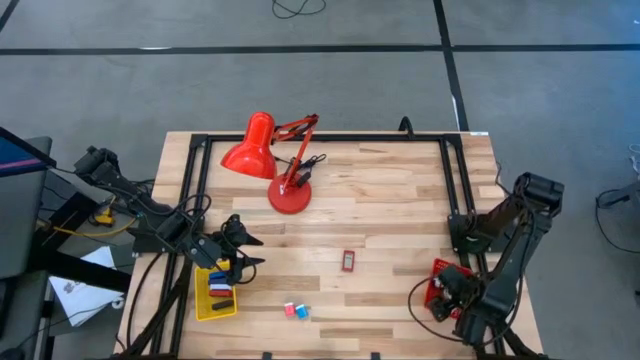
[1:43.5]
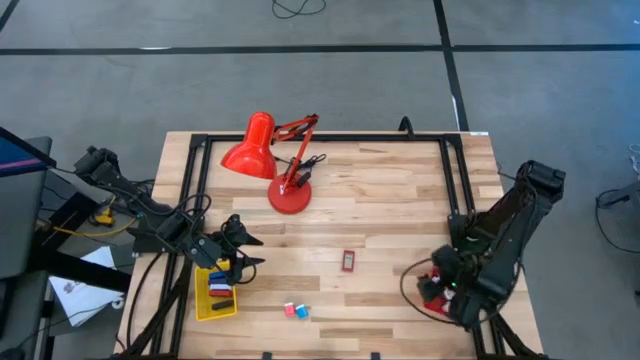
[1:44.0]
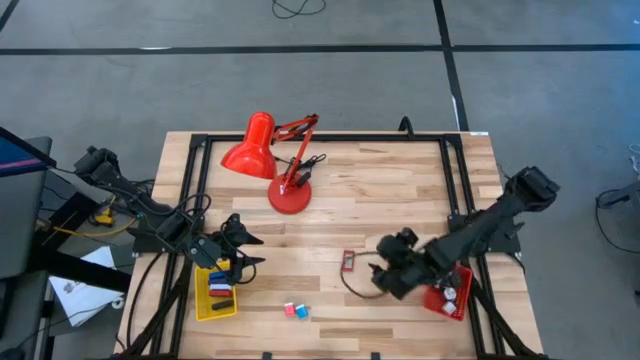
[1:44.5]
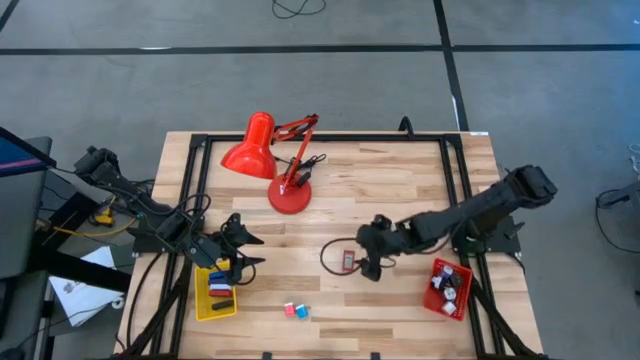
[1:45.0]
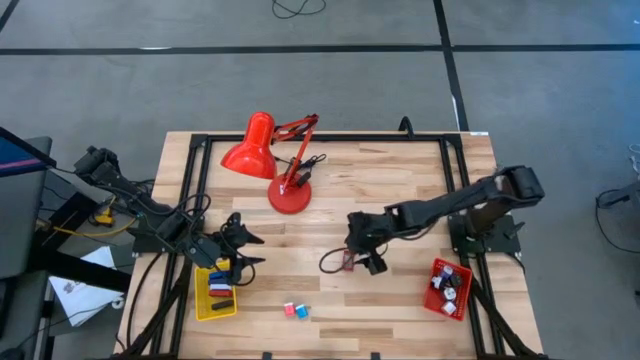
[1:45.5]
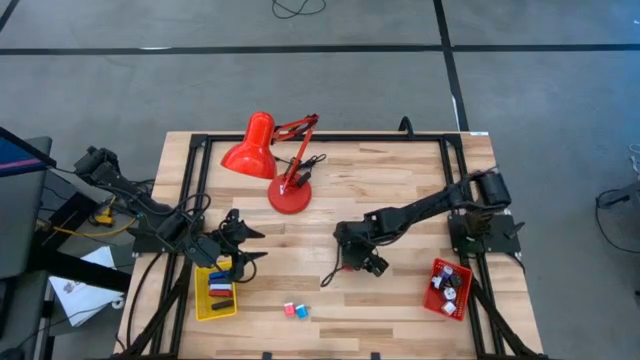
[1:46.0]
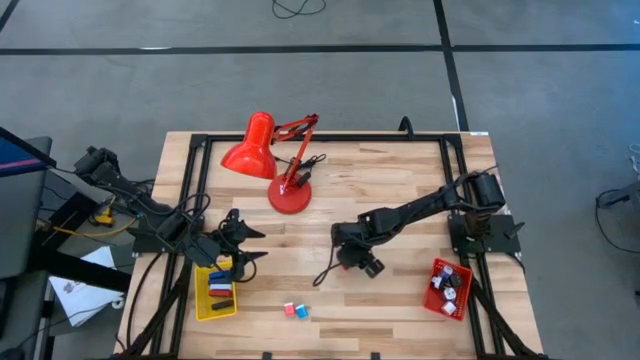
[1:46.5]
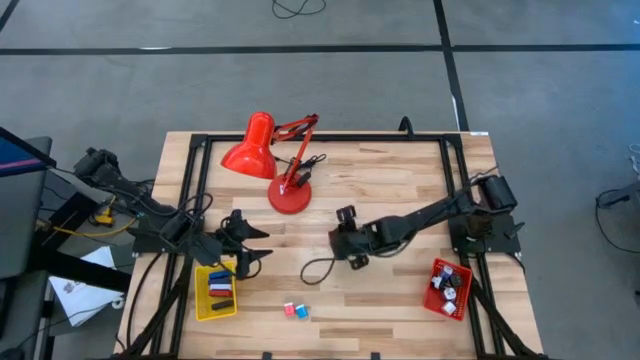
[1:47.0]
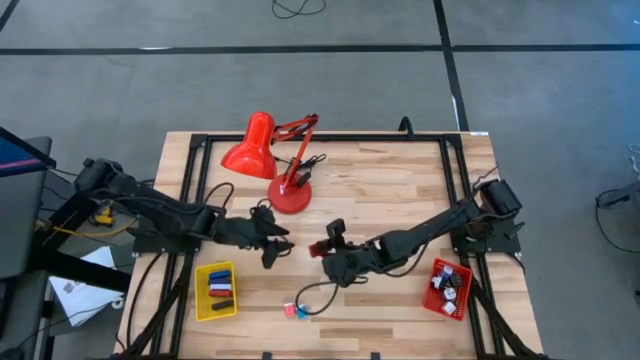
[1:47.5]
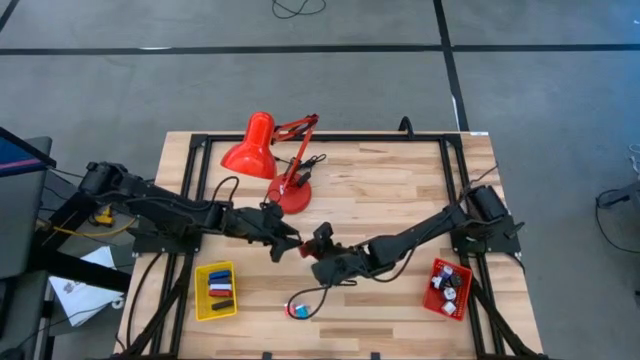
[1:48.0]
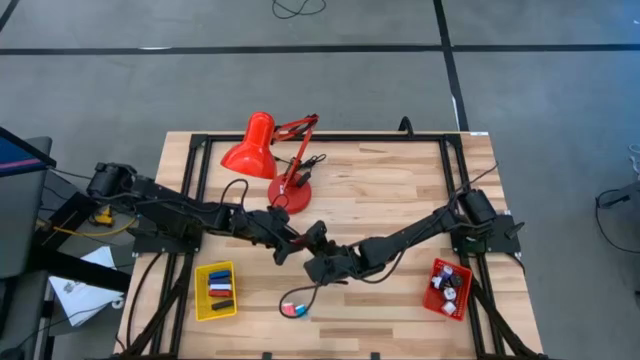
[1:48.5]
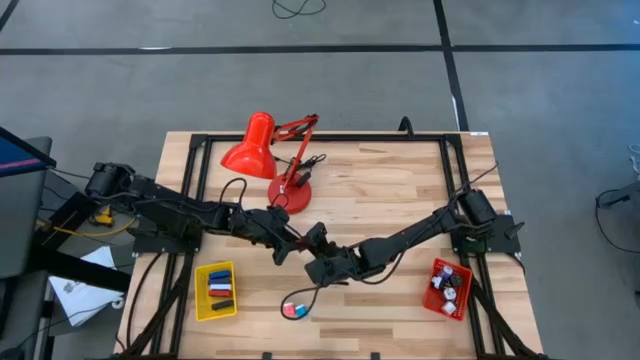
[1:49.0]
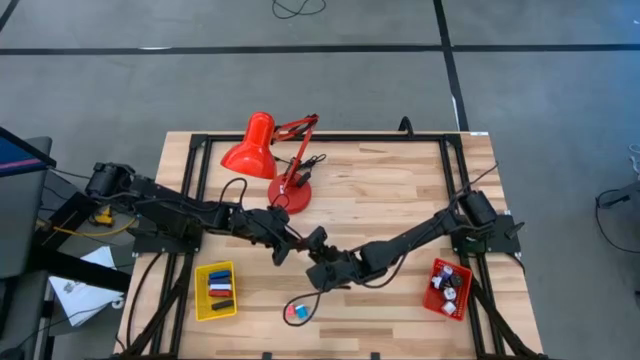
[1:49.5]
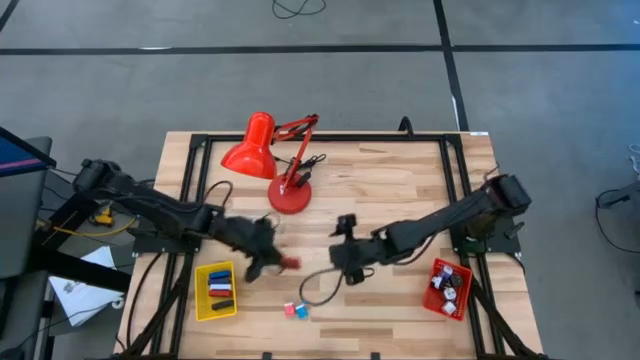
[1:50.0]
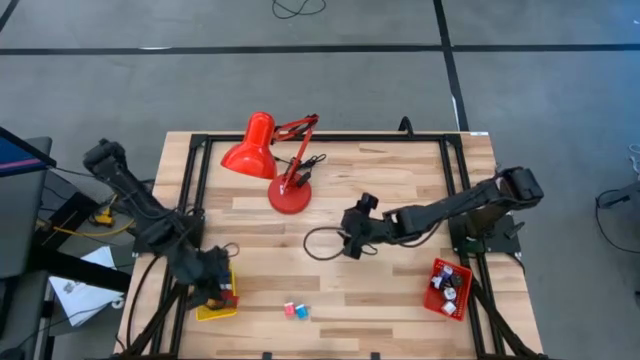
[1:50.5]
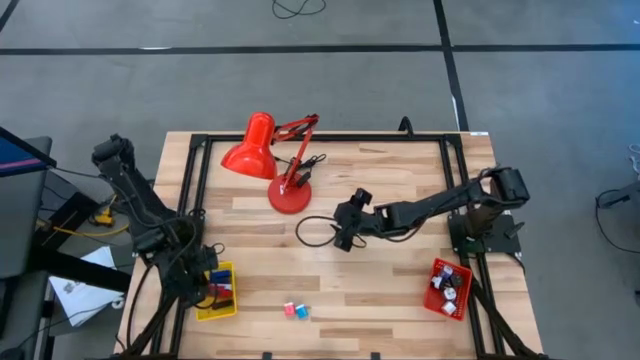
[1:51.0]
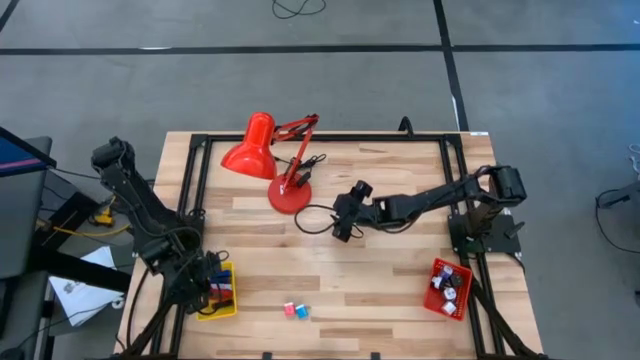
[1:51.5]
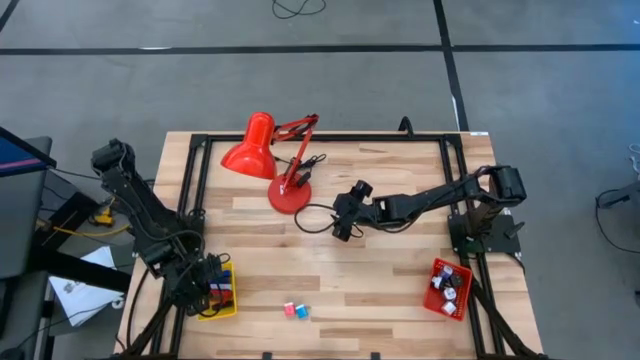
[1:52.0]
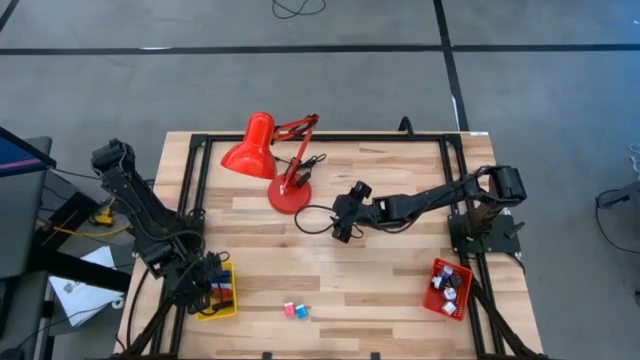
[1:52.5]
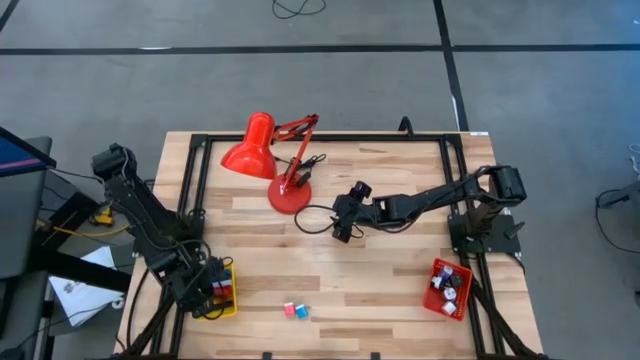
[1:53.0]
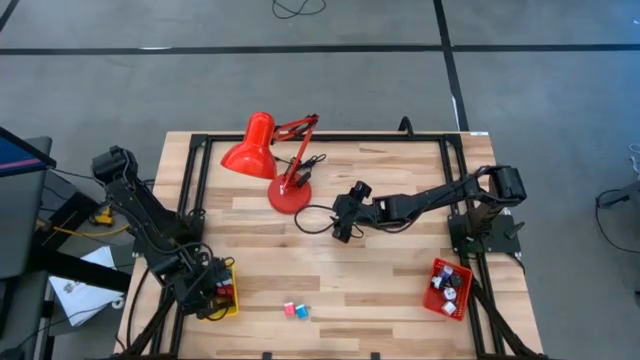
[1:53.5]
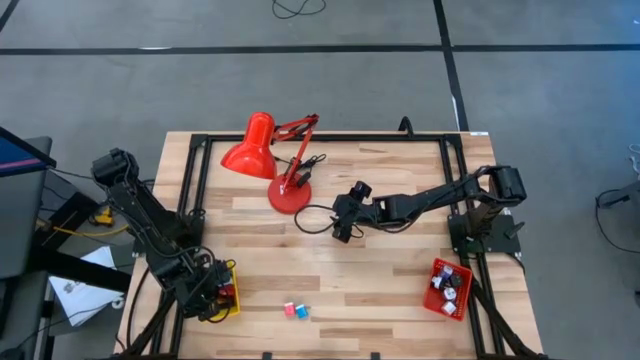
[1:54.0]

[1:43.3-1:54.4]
Task: Pick & Place Office items
Put the red digital timer into the yellow bin

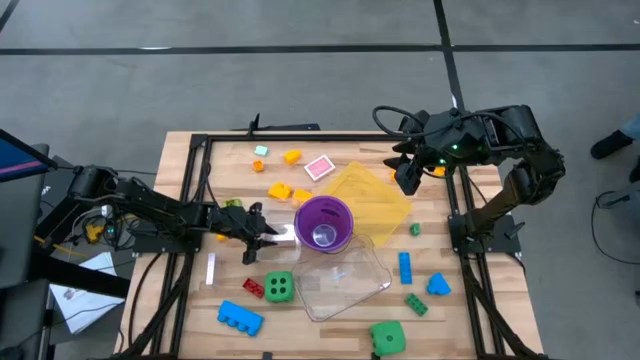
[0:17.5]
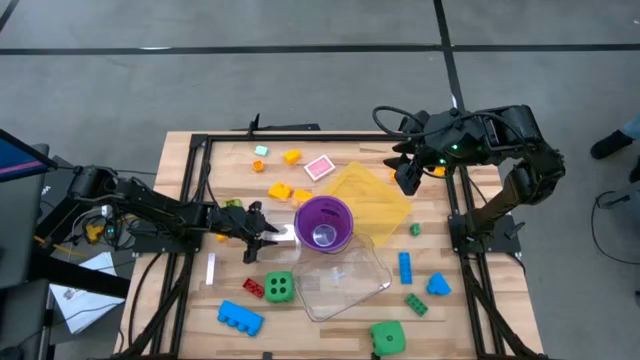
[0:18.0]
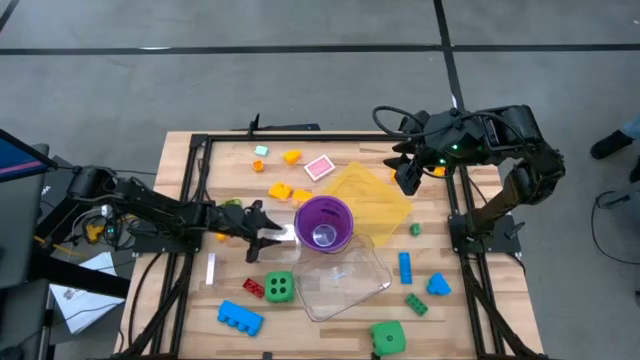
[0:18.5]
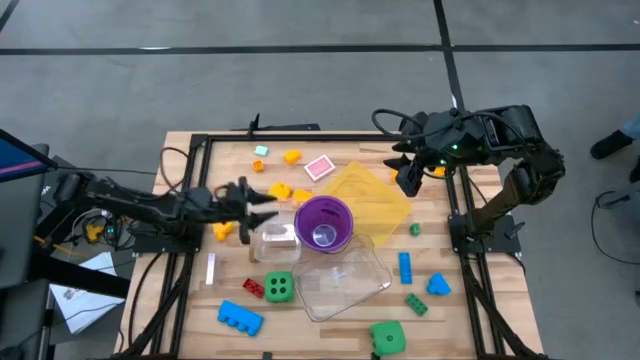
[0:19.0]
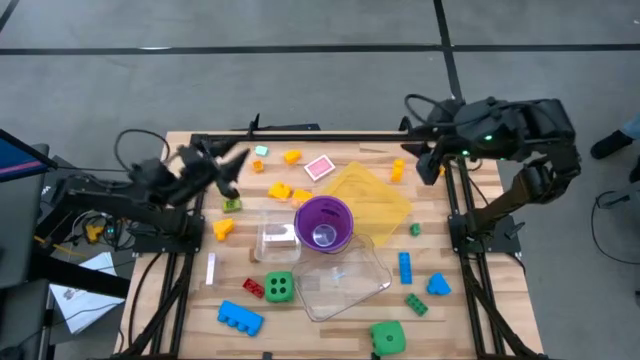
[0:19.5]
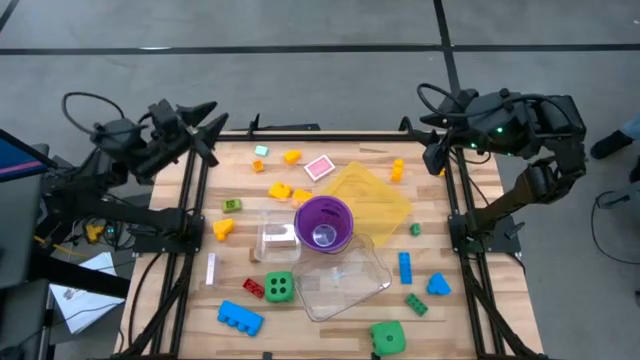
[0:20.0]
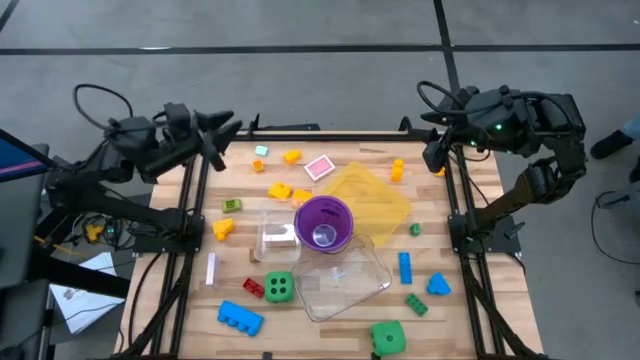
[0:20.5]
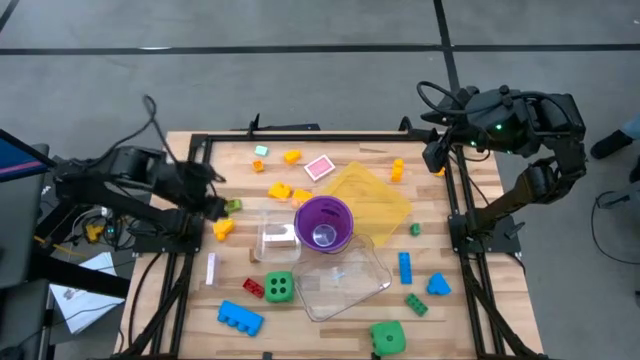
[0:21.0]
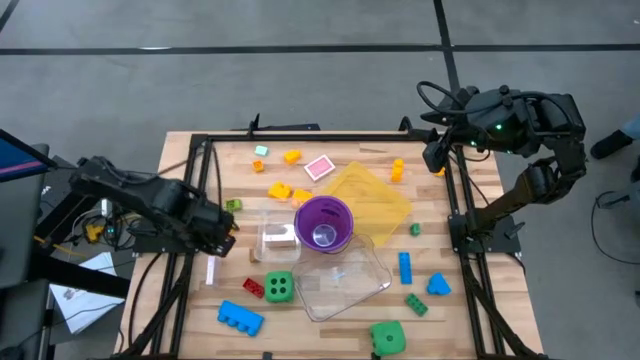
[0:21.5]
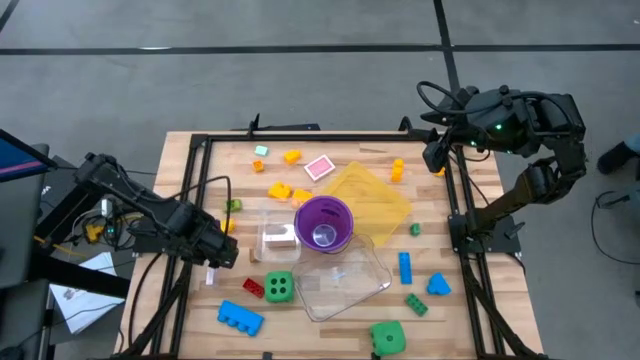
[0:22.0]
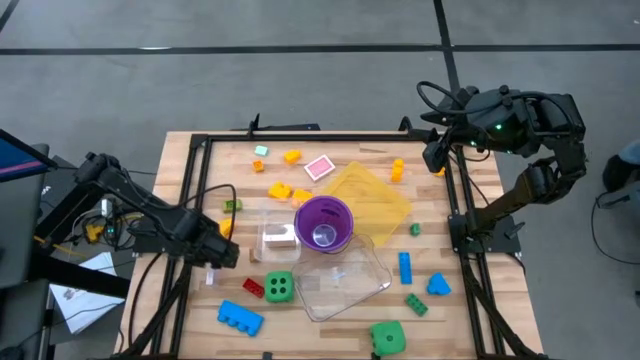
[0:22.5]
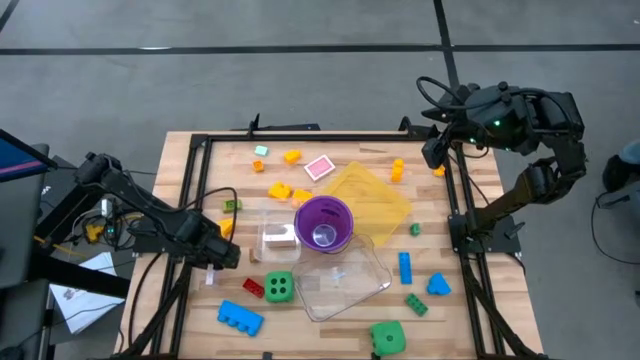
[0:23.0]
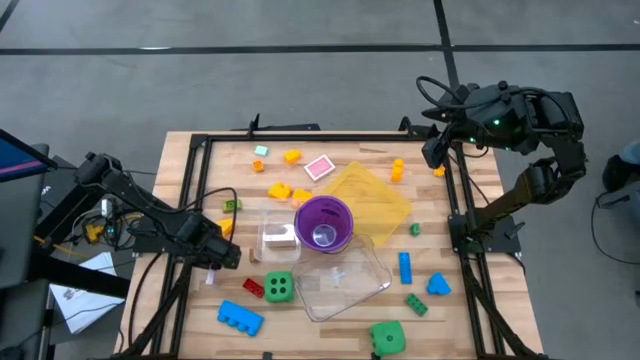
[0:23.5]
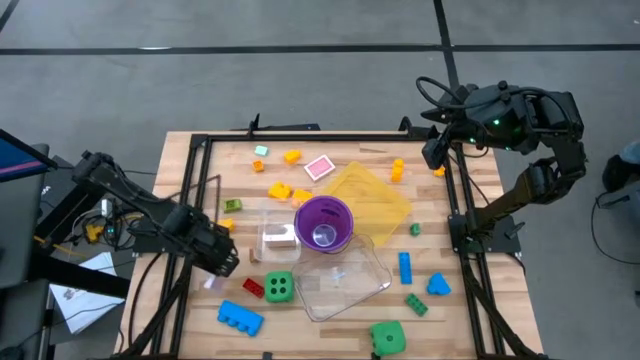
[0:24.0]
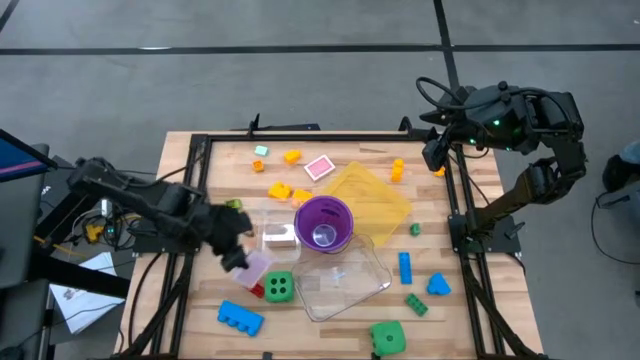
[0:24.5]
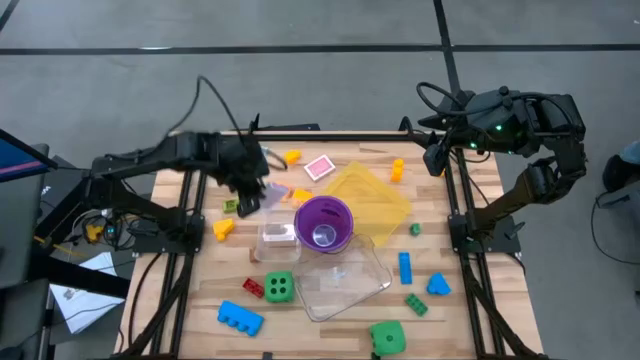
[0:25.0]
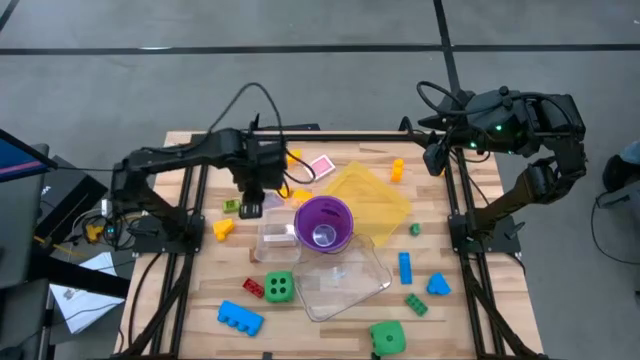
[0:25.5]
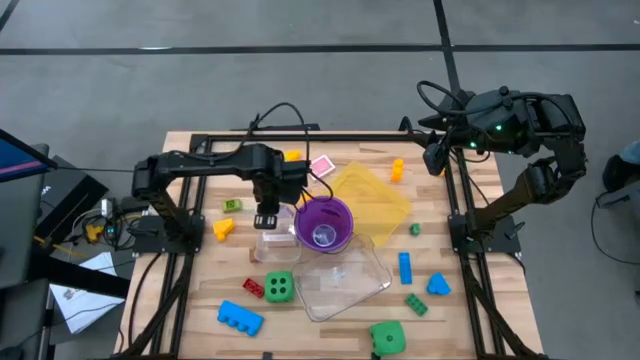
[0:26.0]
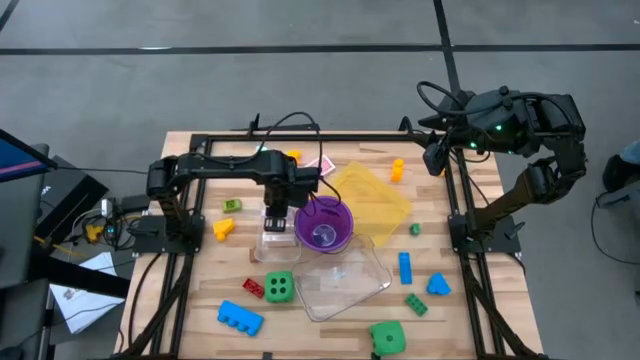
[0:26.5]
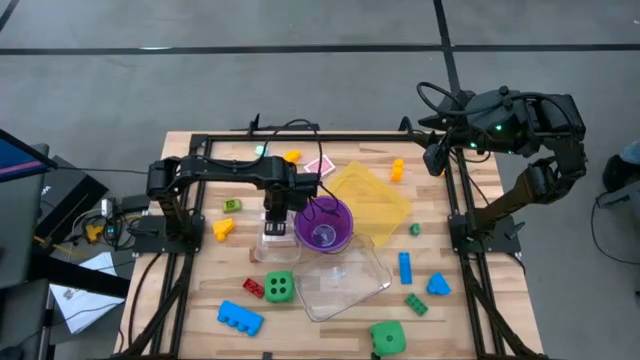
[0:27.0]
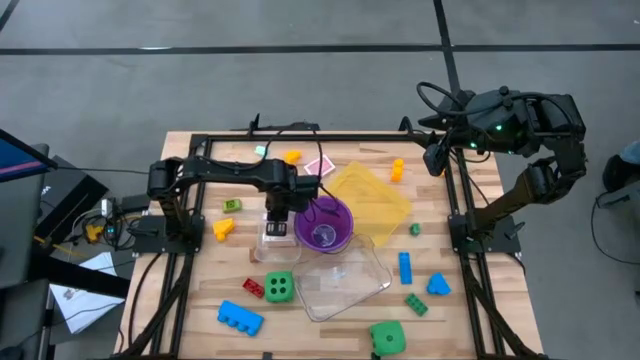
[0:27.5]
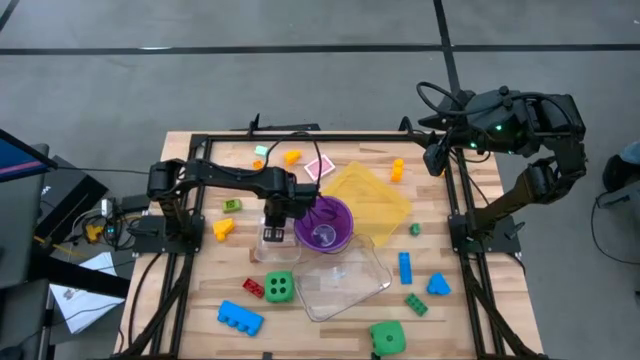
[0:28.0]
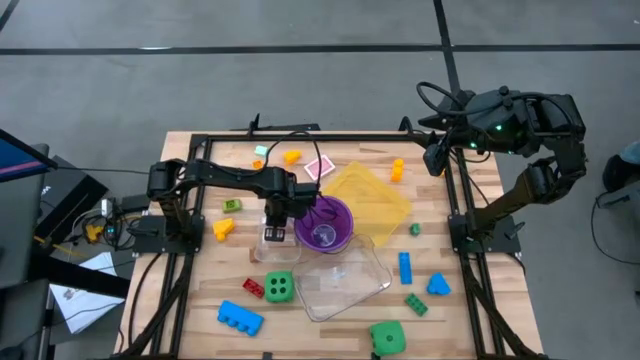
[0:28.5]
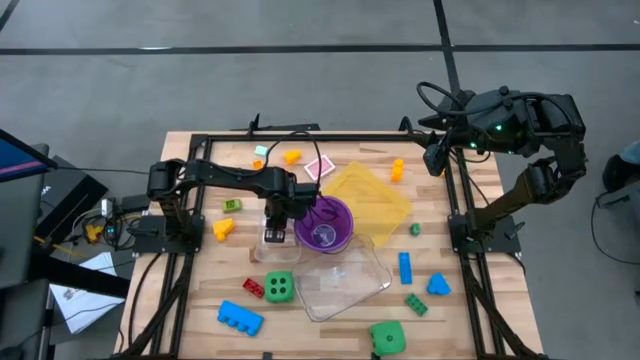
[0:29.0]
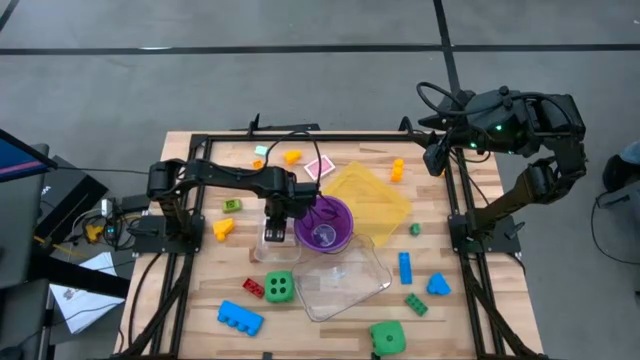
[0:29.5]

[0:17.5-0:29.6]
Task: Pick & Place Toys
Put the pink deck of cards into the white bin
